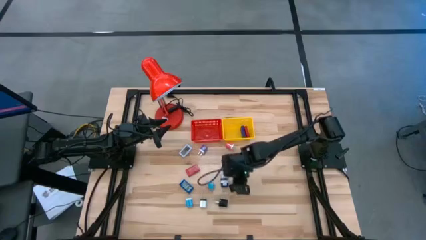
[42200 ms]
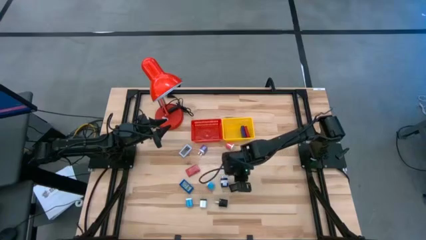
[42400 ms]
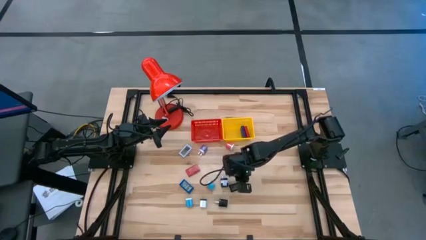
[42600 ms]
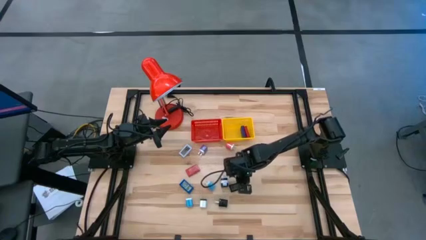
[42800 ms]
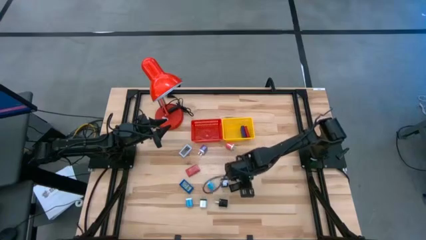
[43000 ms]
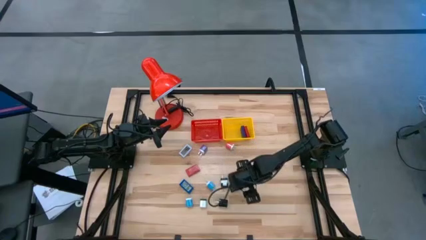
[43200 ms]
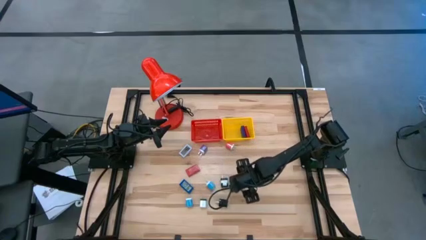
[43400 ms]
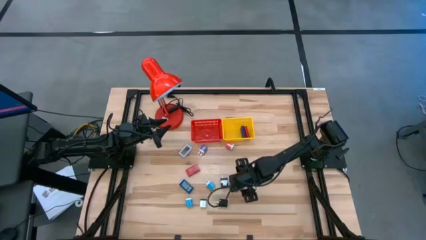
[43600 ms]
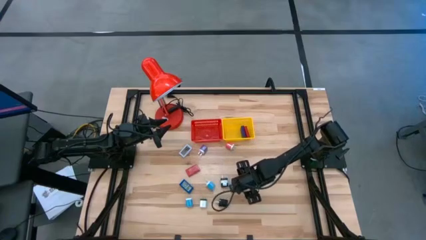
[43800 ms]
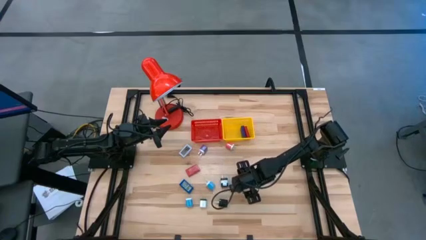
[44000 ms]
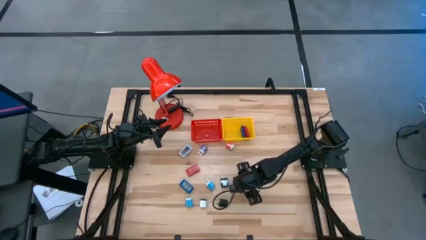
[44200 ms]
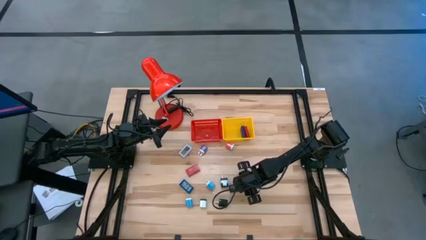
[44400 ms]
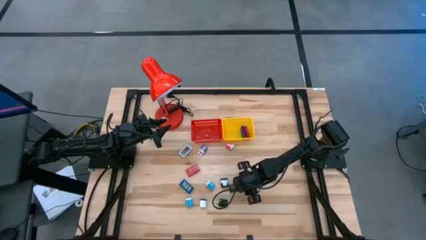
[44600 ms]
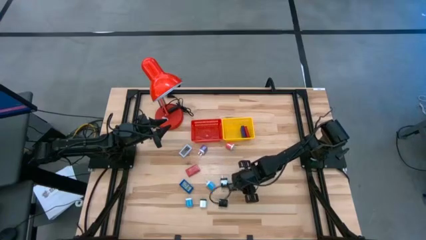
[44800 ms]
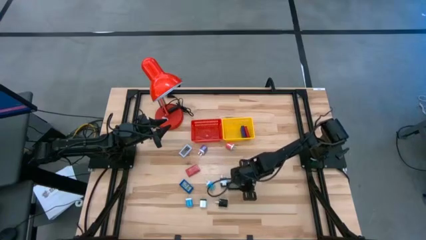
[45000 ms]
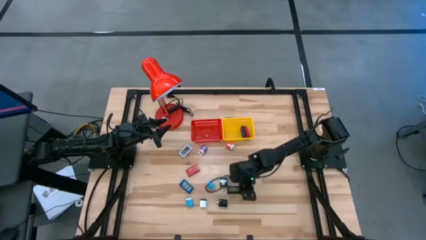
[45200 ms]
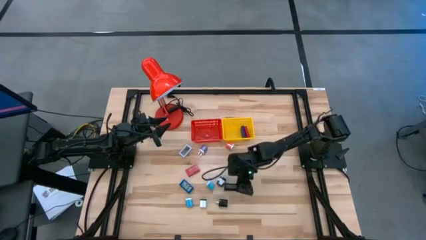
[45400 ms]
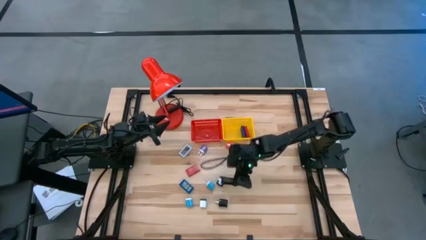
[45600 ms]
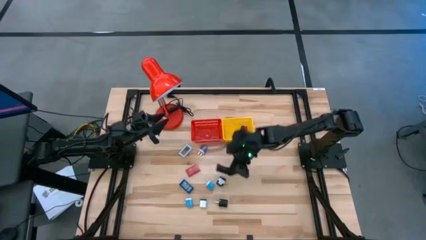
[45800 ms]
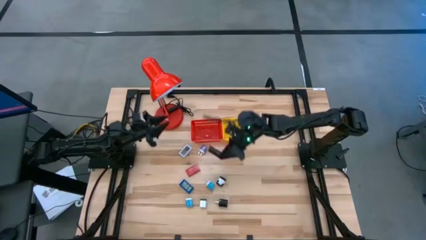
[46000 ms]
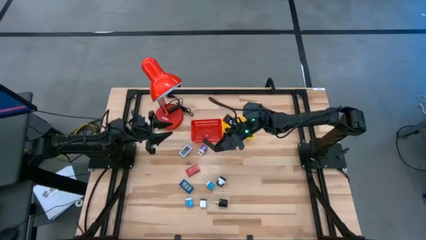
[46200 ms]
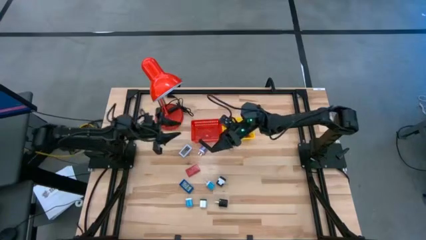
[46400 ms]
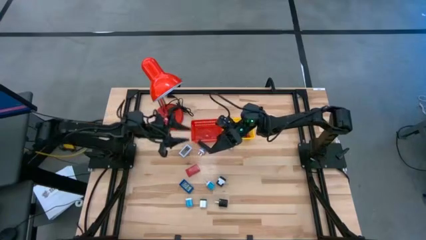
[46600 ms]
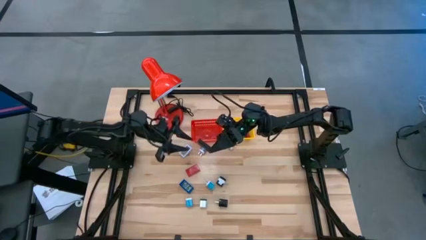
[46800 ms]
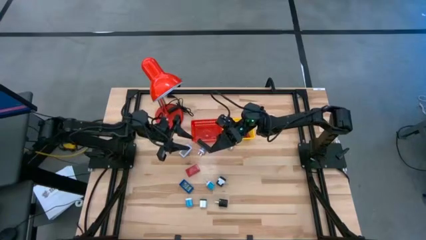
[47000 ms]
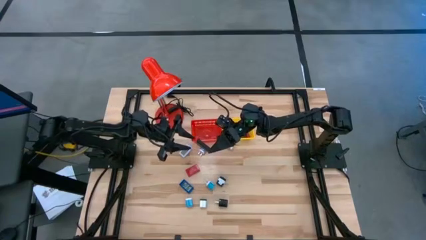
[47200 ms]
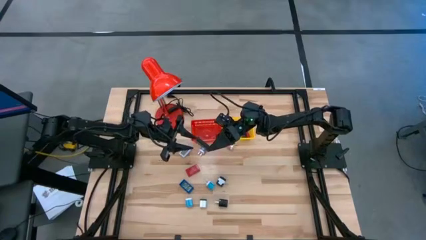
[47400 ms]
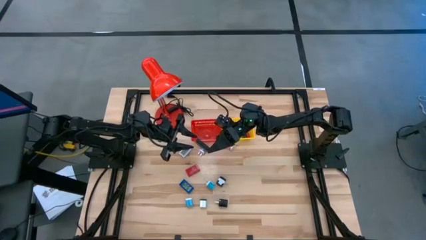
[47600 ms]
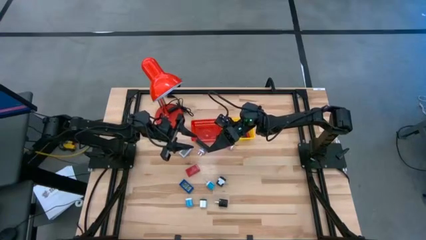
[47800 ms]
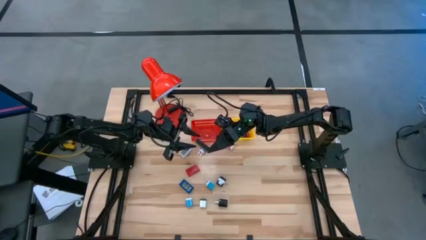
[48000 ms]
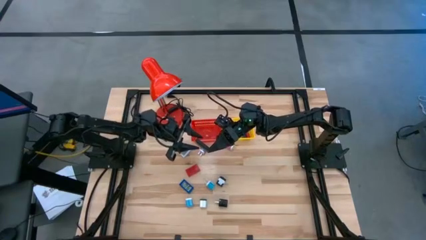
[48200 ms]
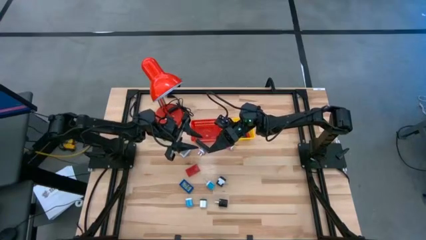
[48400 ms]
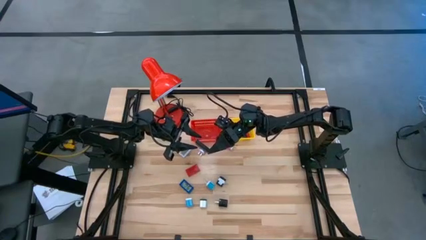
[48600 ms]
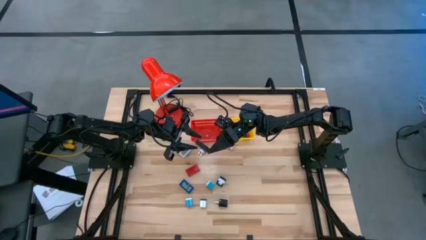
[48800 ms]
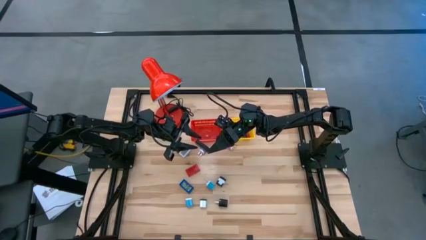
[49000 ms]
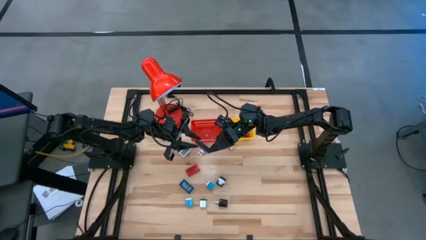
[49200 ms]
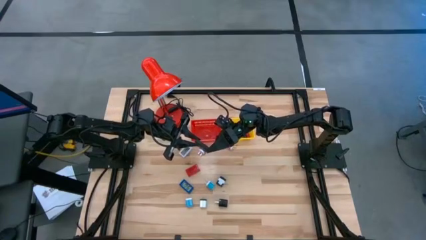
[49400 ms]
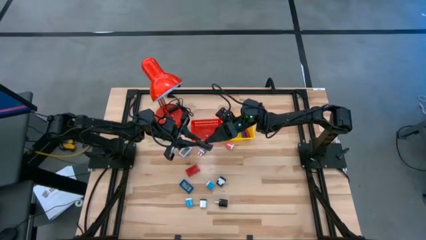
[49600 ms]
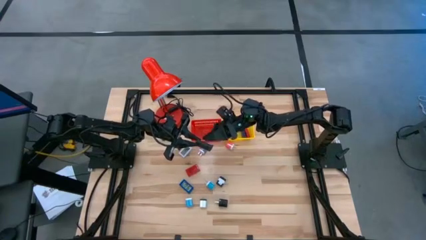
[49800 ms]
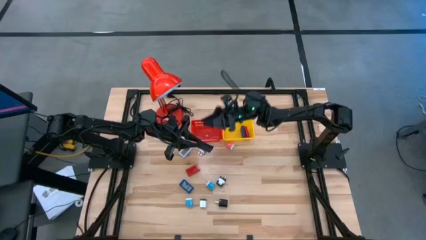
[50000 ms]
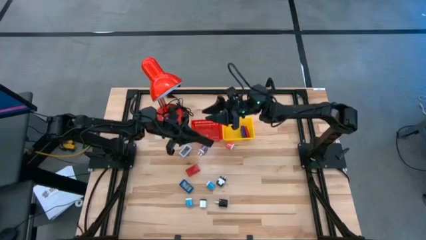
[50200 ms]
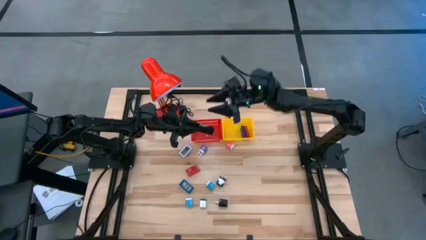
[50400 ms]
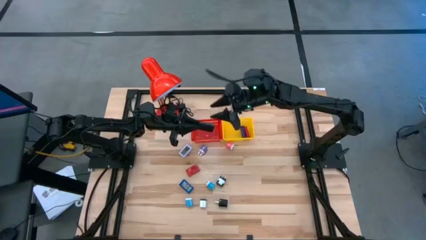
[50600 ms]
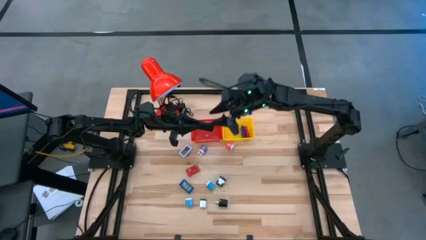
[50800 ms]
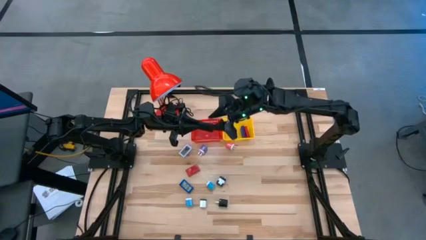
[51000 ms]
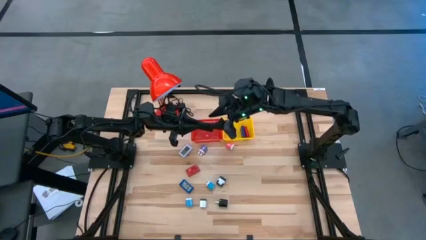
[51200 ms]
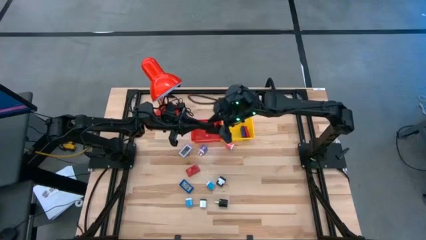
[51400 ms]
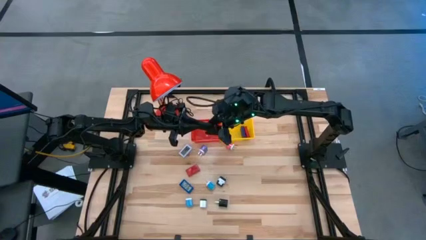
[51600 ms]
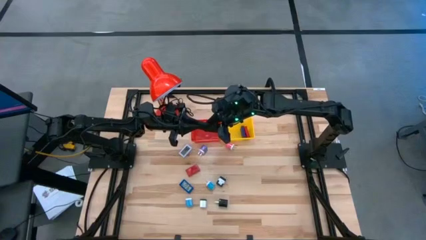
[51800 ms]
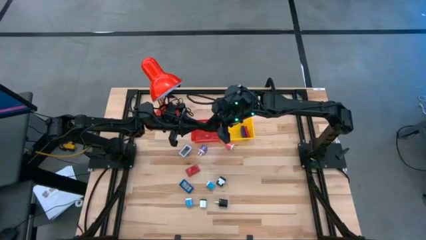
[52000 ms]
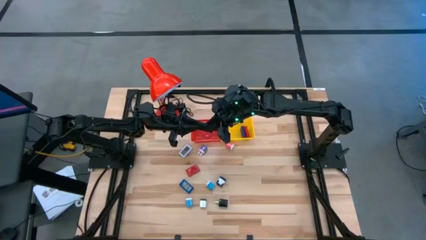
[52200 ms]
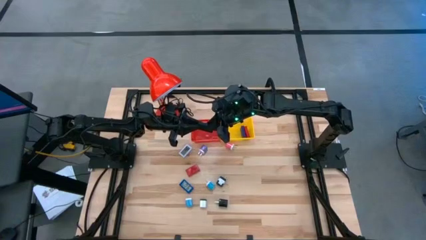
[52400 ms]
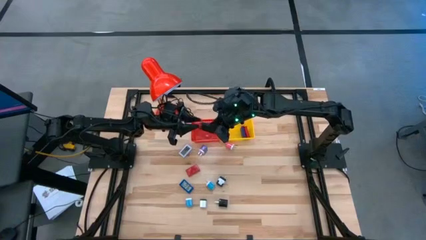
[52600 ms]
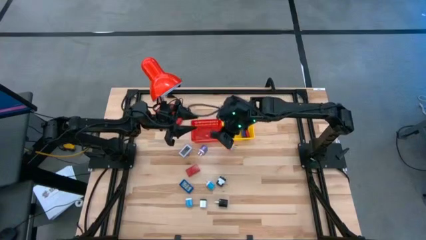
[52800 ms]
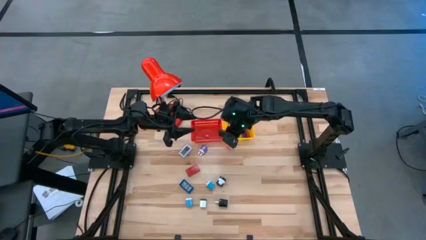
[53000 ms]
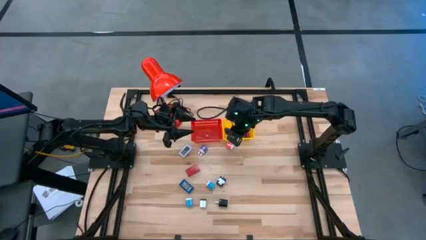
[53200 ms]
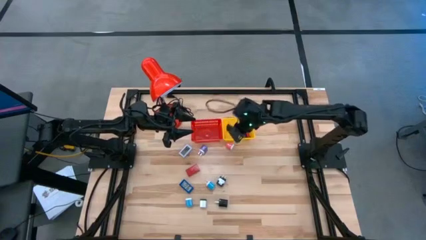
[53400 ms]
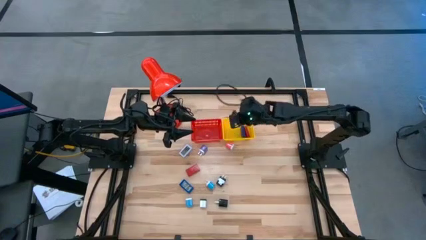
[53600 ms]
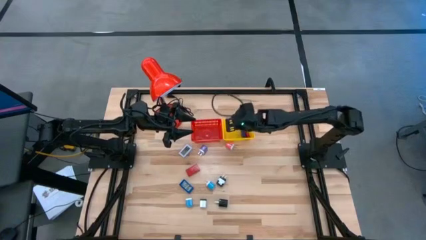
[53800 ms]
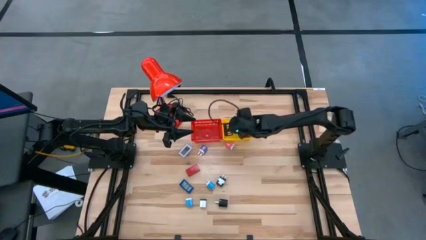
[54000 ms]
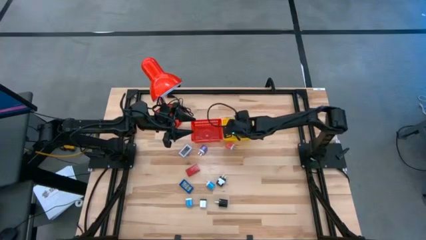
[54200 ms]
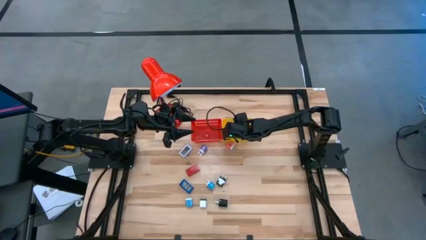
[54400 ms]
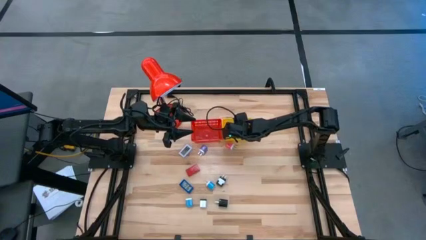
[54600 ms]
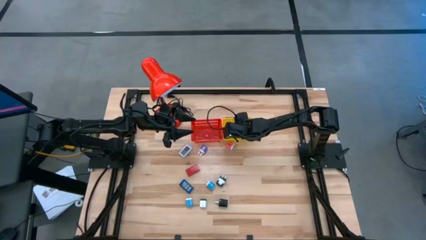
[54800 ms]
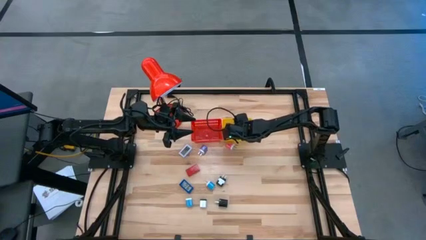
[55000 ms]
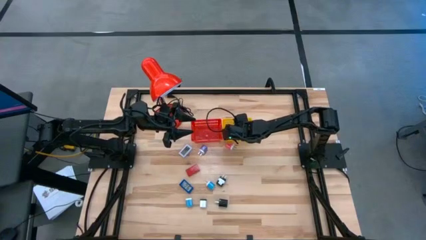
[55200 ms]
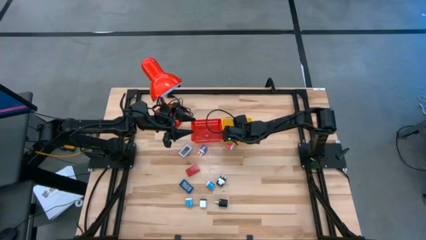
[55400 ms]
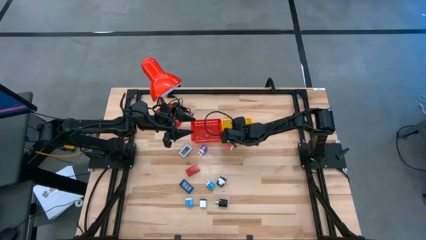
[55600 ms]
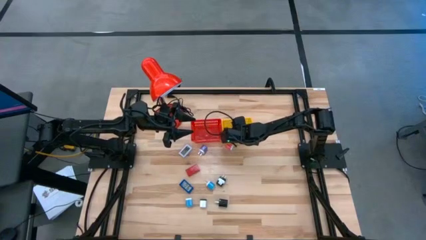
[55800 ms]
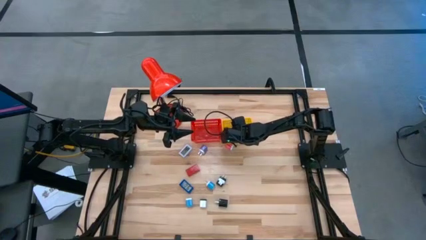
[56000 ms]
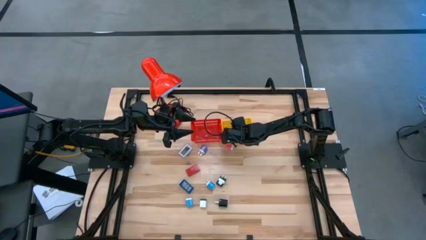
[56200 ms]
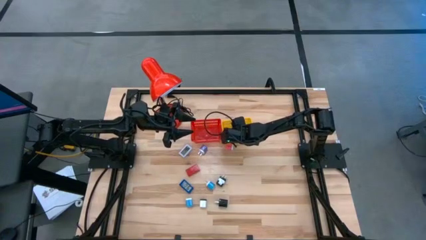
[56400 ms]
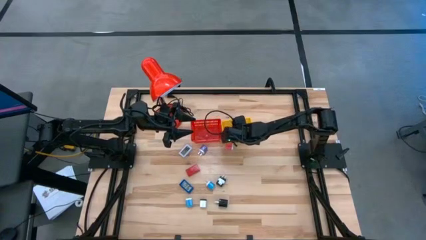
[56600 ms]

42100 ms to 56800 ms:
Task: Pick & Place Office items
Put the black digital timer into the yellow bin
